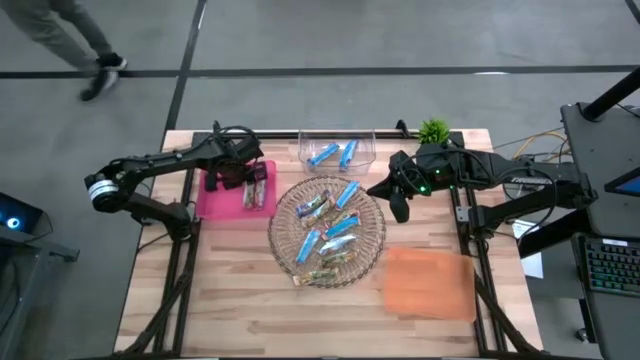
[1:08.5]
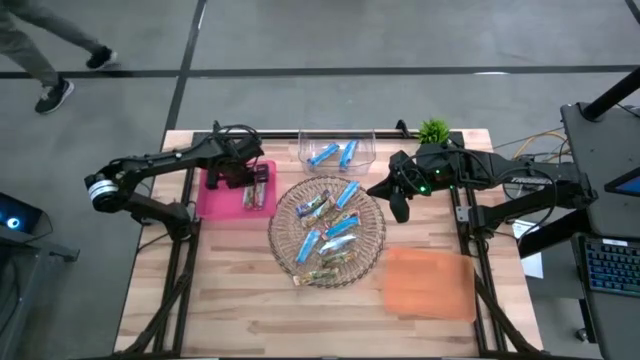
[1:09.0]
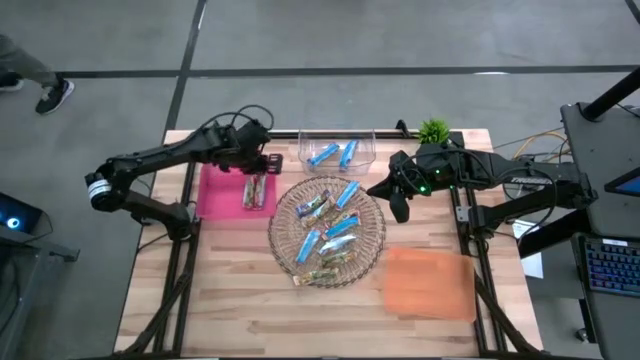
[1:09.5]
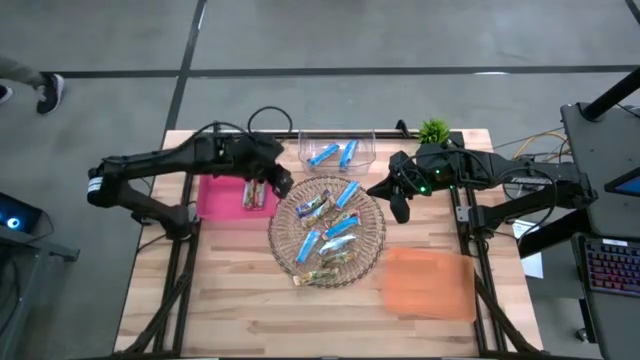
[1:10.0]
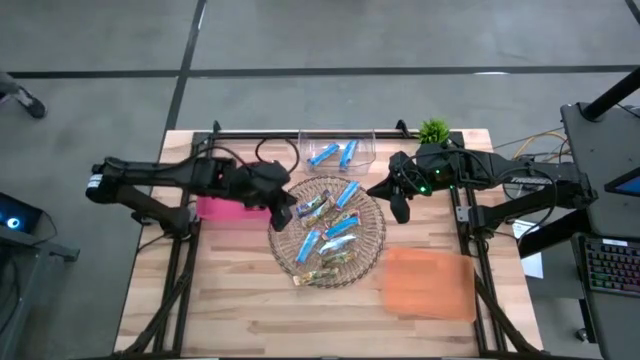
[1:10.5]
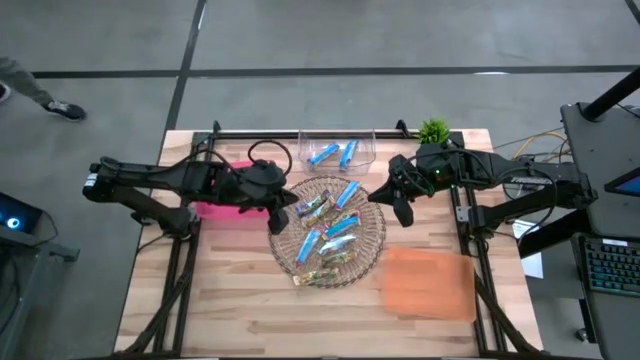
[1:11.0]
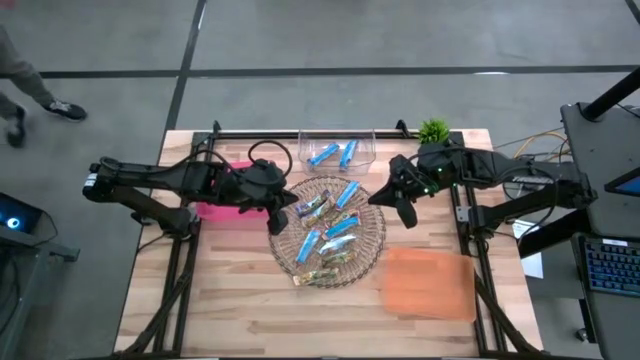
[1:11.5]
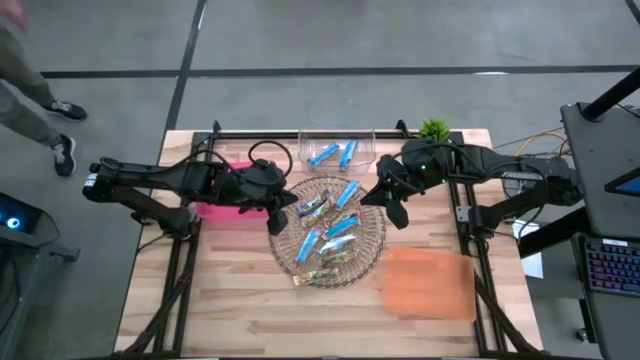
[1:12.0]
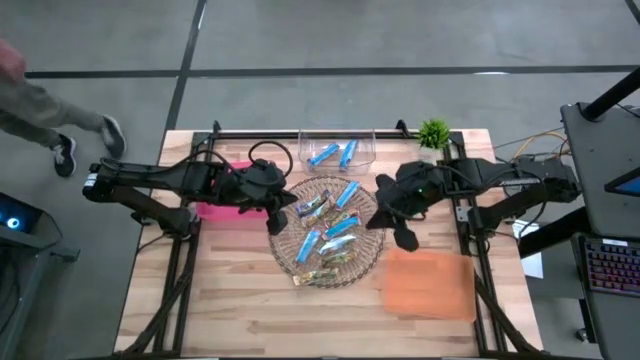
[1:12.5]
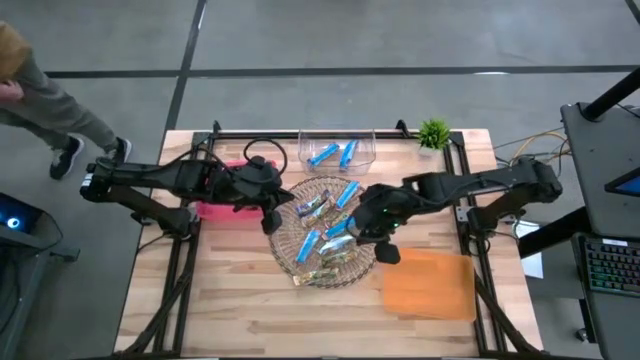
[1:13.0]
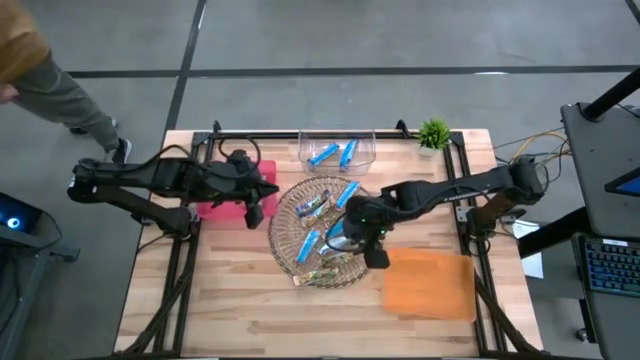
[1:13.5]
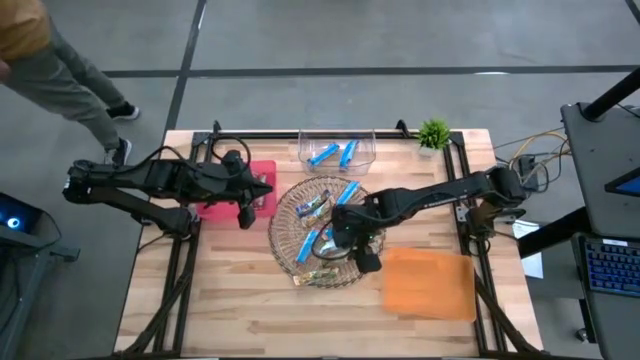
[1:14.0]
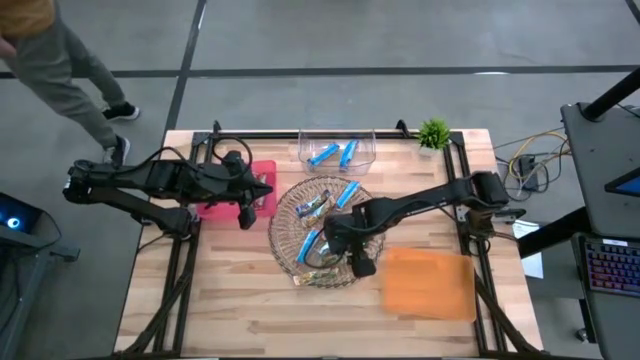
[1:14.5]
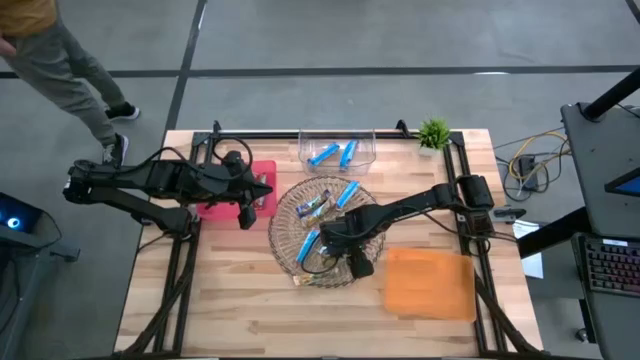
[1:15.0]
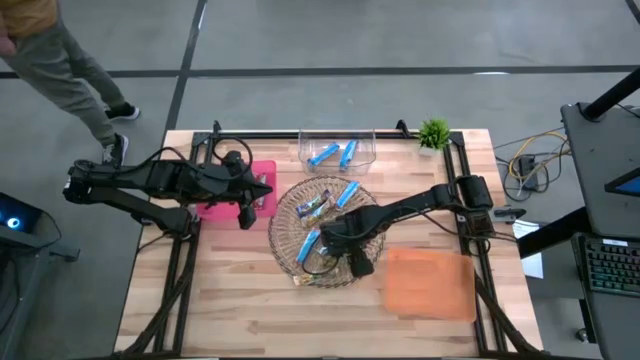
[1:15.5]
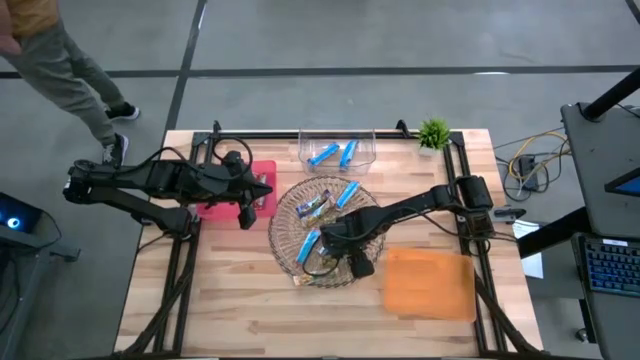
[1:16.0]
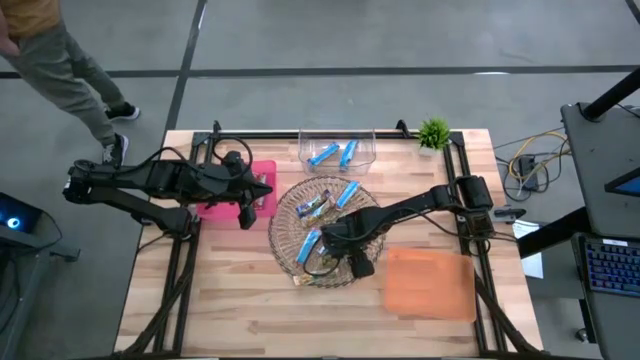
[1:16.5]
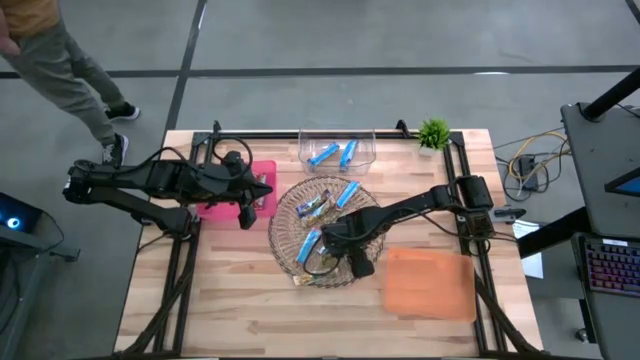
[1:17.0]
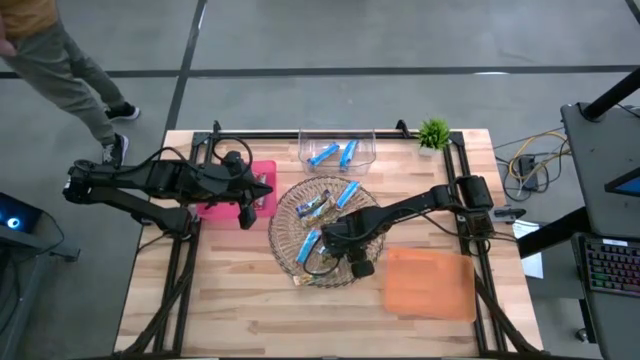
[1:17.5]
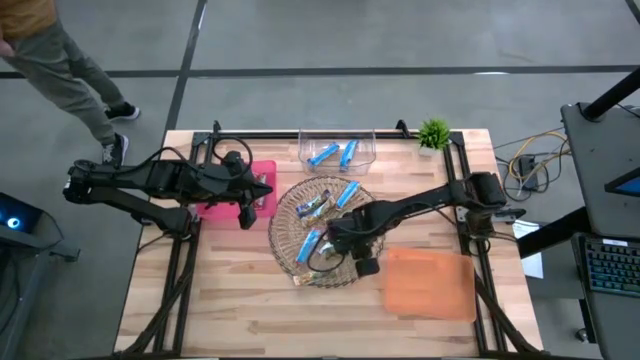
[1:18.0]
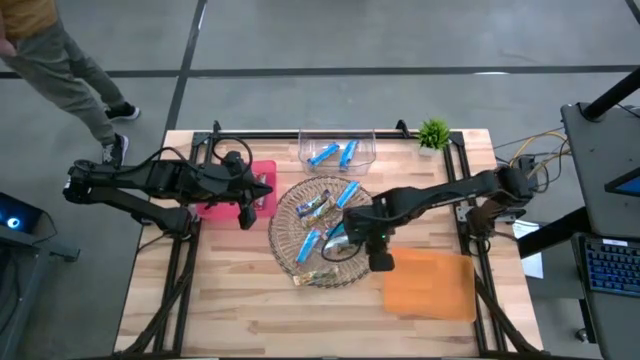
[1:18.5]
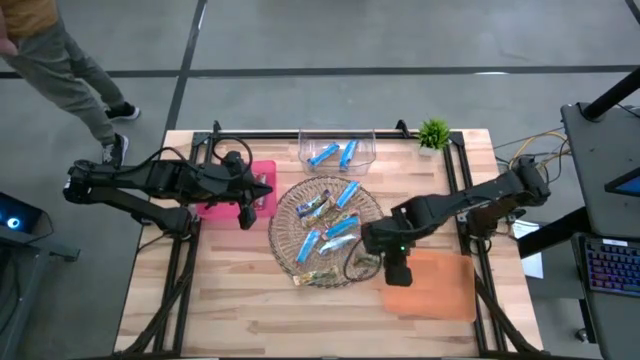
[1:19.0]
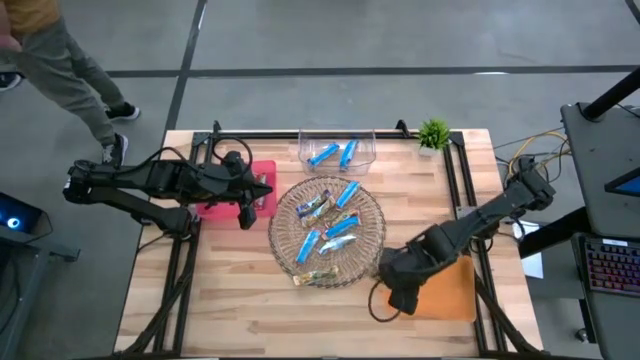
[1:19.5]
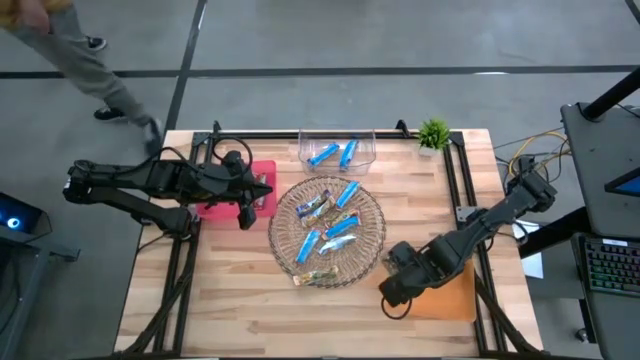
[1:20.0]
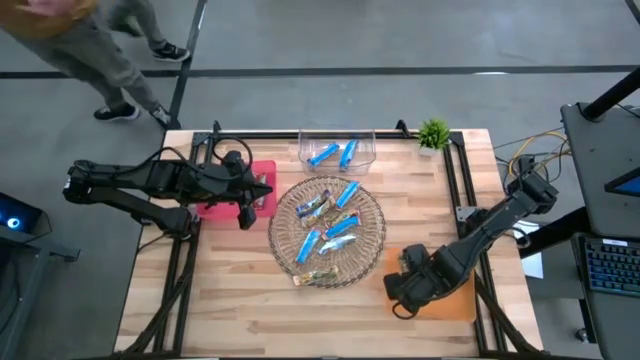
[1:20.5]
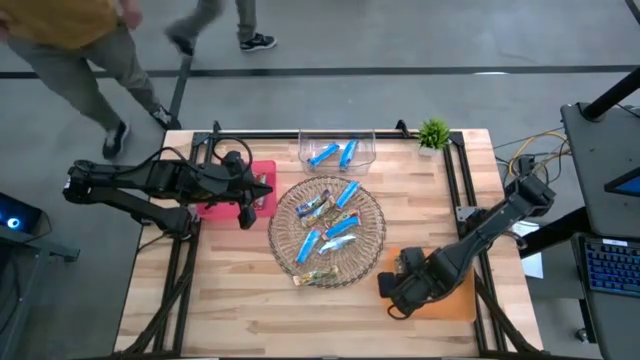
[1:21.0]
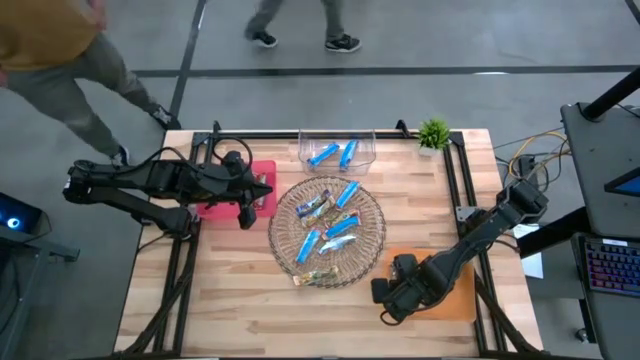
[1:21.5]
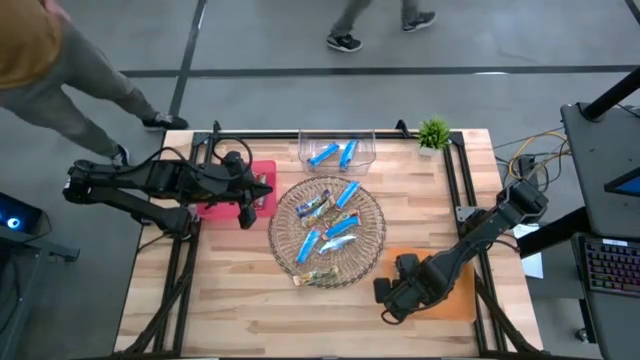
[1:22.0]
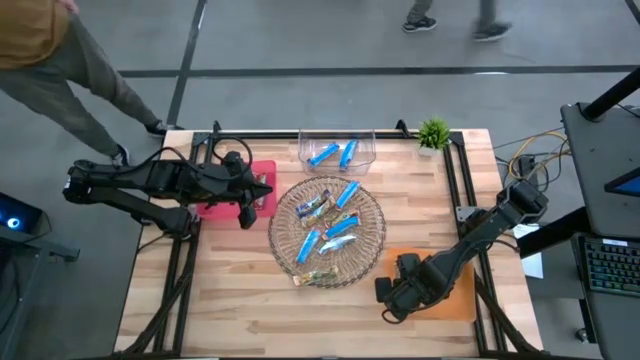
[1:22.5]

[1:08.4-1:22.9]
Task: Pick and place Granola Bars by type
Put the yellow granola bar into the orange bin

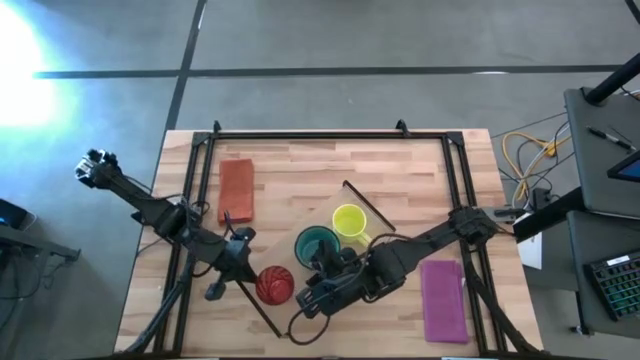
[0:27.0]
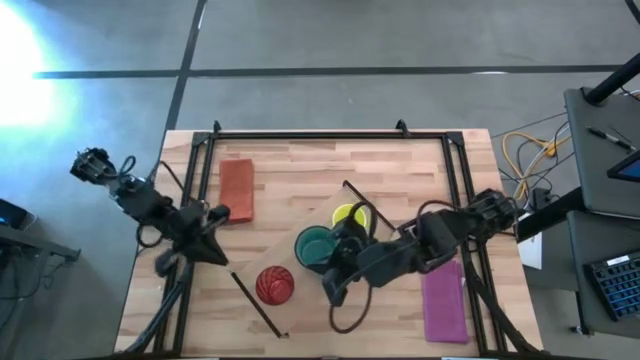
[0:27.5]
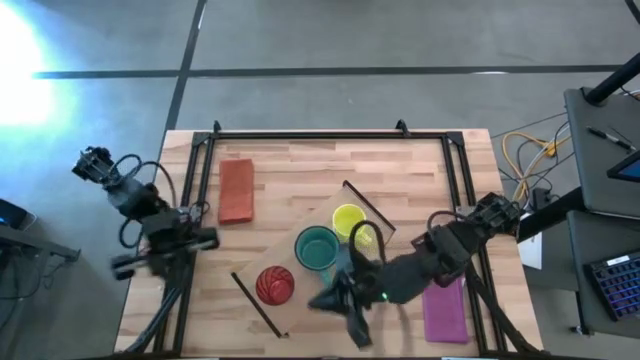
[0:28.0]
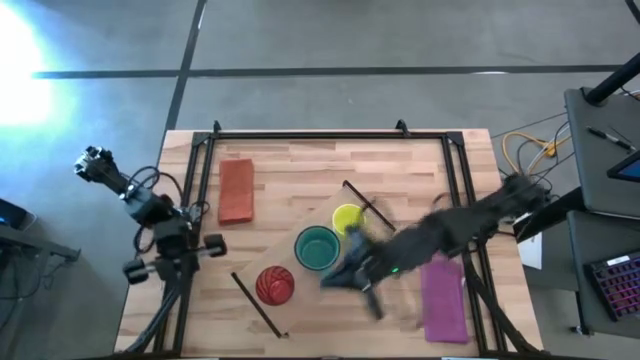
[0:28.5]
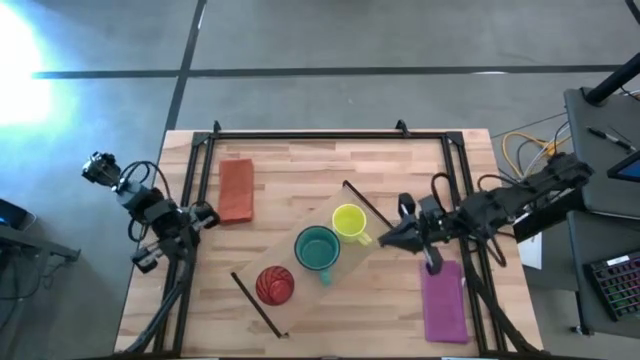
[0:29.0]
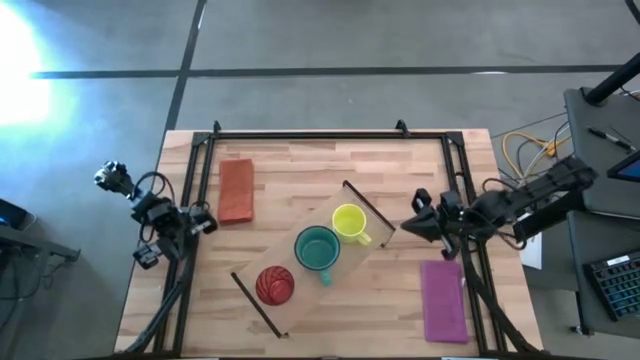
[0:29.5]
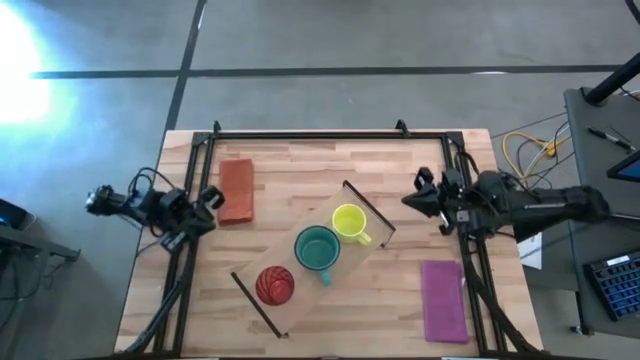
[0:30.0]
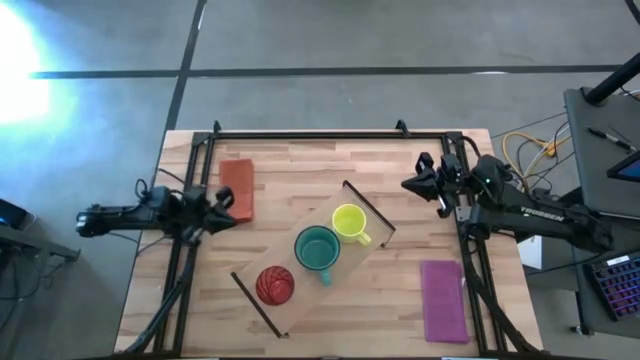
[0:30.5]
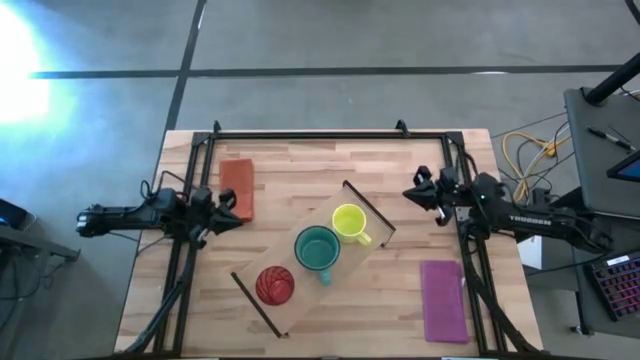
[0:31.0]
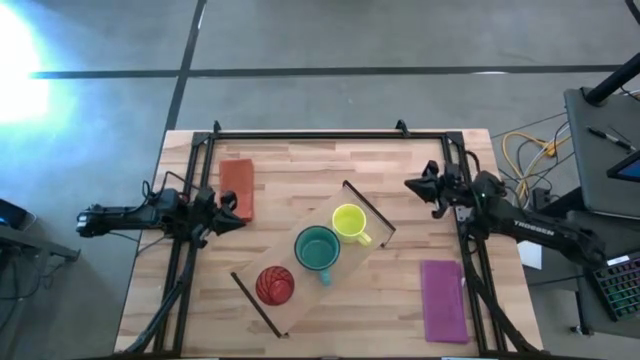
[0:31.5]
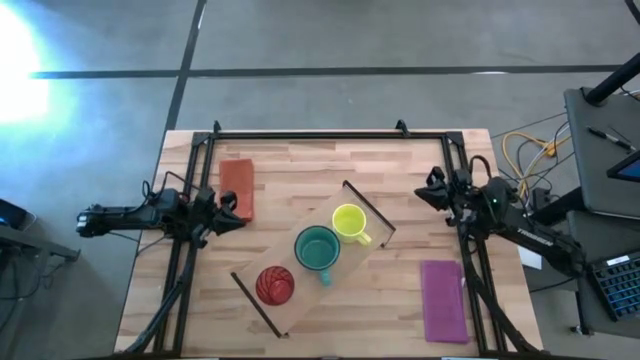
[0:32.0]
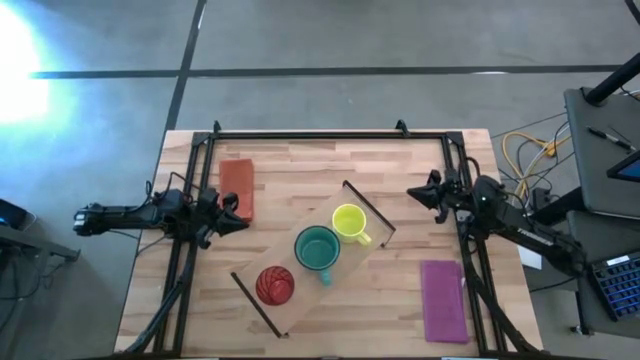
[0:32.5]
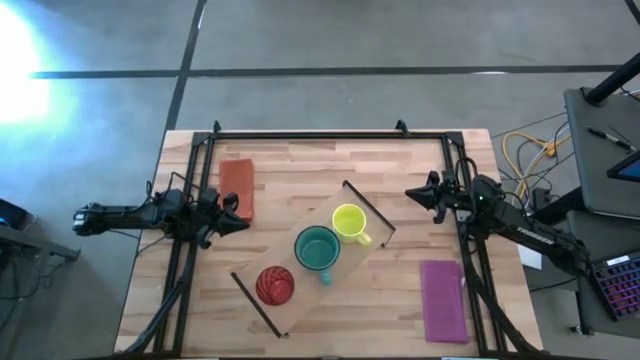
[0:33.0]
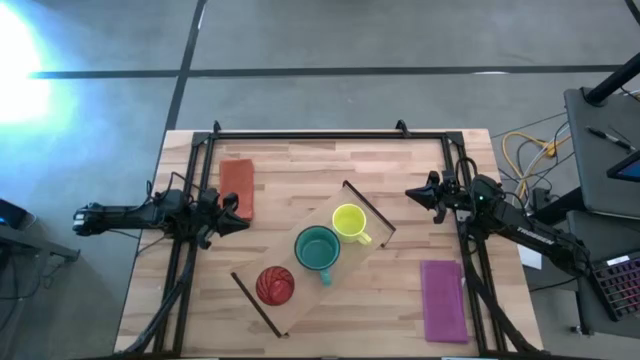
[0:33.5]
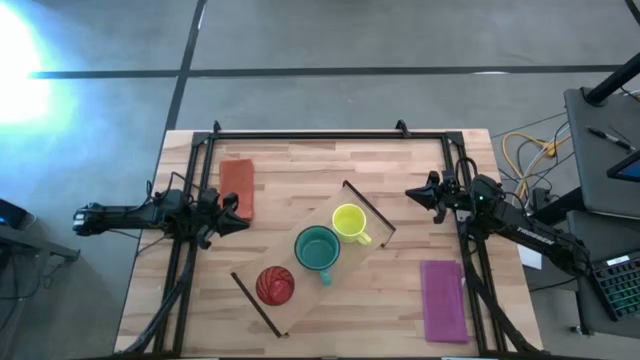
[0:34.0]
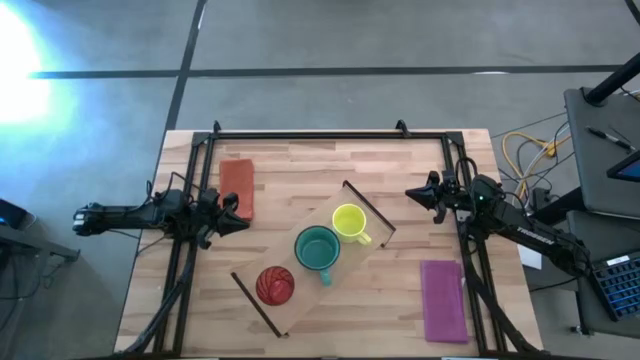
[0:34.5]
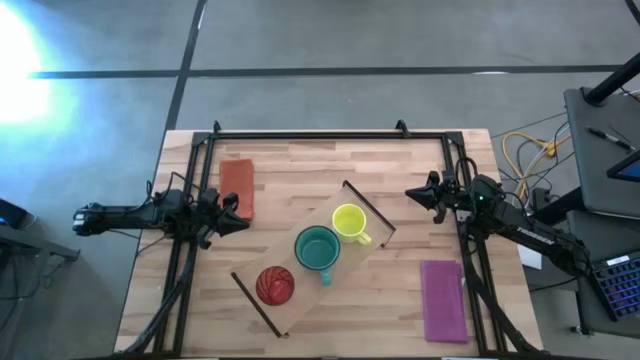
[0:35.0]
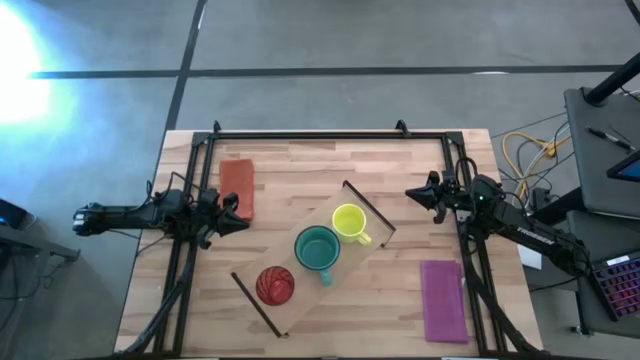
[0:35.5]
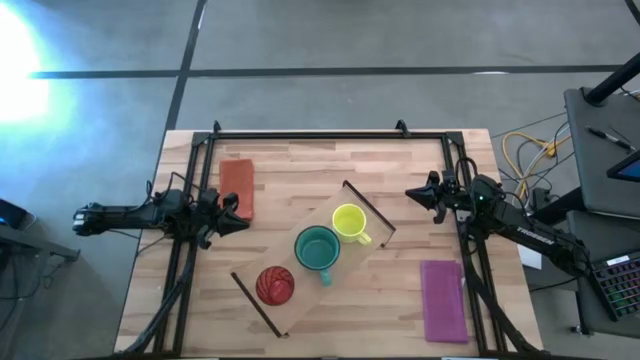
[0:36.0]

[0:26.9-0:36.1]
Task: Stack small to large cups/mugs on shelf
Return to Home Position
